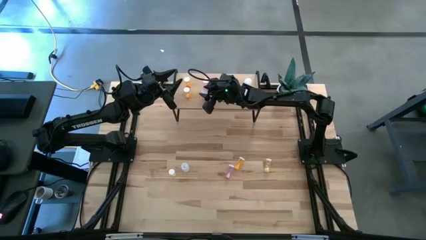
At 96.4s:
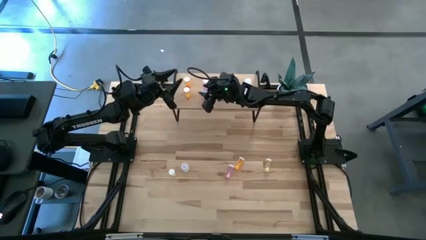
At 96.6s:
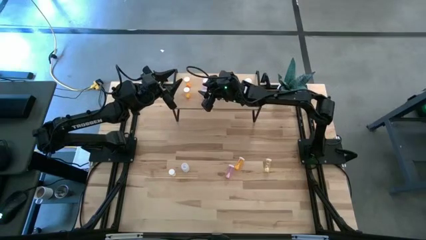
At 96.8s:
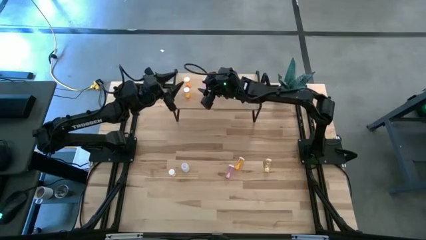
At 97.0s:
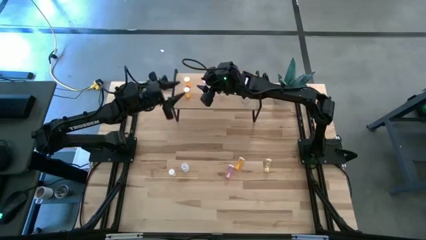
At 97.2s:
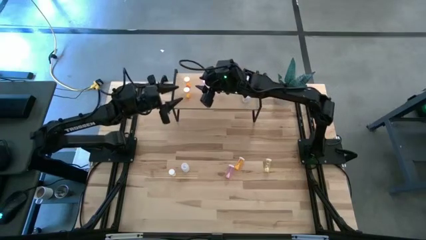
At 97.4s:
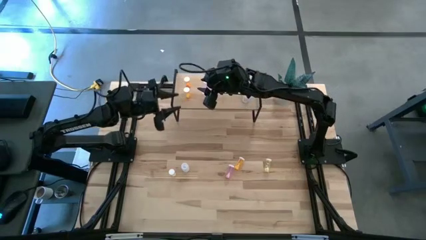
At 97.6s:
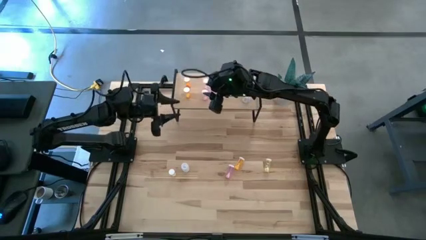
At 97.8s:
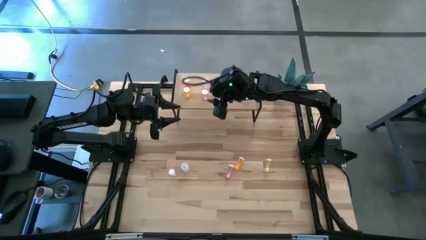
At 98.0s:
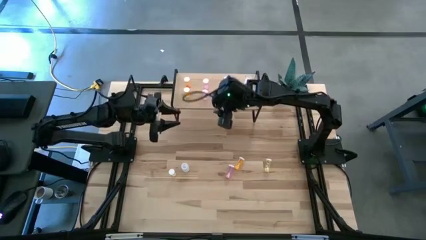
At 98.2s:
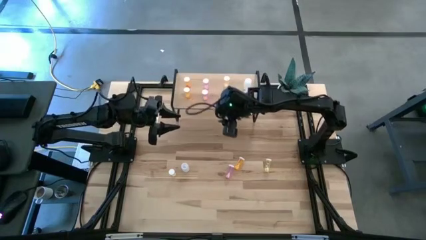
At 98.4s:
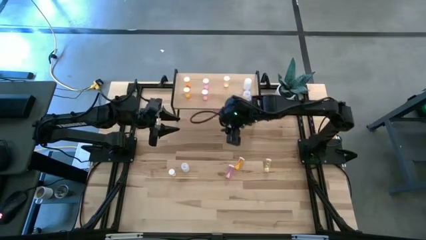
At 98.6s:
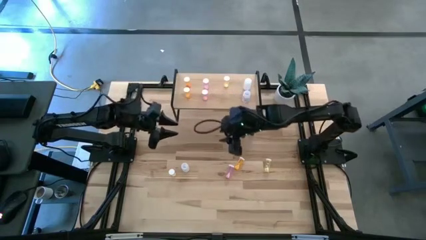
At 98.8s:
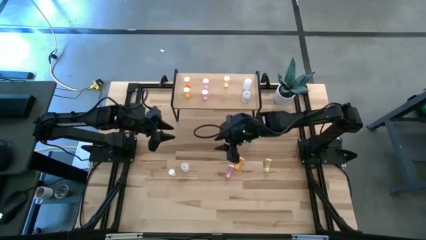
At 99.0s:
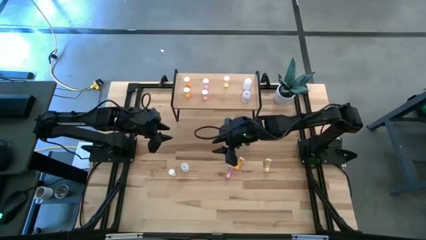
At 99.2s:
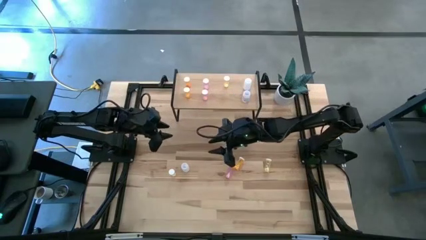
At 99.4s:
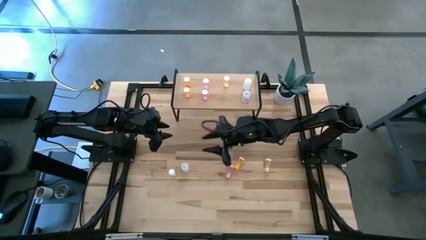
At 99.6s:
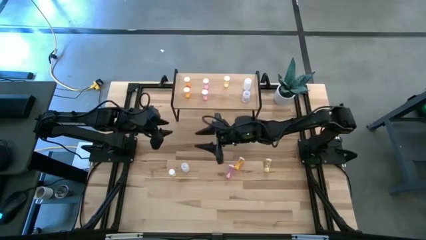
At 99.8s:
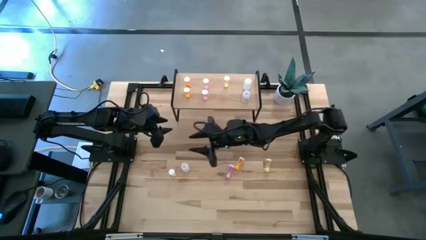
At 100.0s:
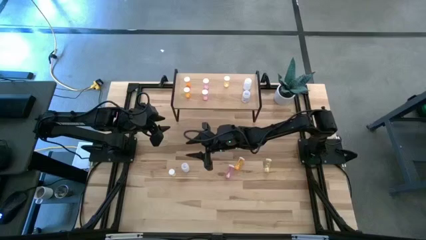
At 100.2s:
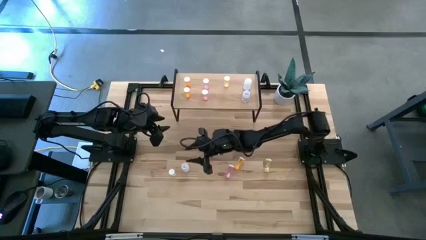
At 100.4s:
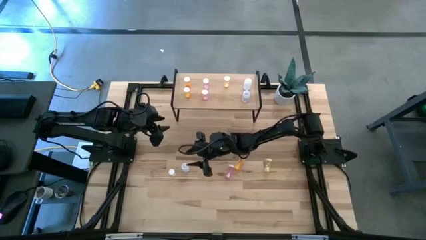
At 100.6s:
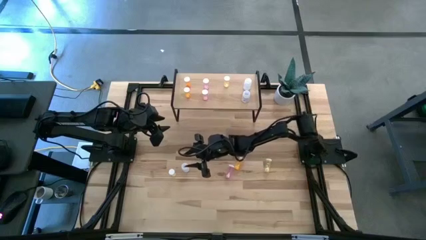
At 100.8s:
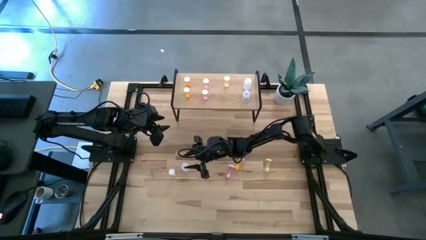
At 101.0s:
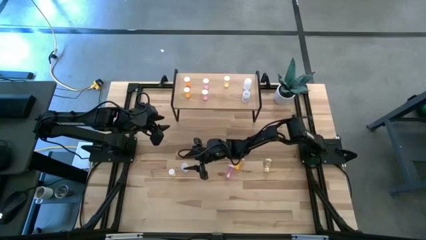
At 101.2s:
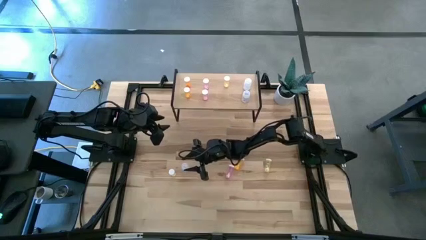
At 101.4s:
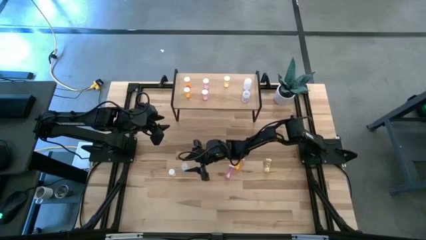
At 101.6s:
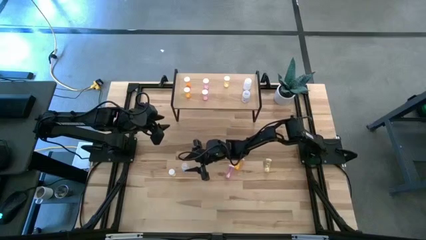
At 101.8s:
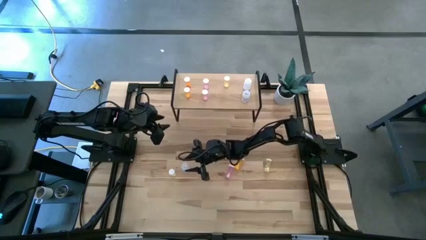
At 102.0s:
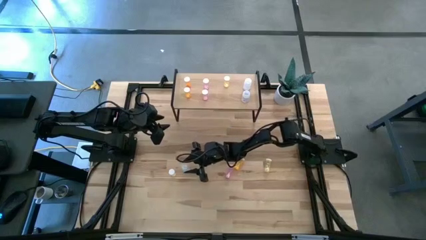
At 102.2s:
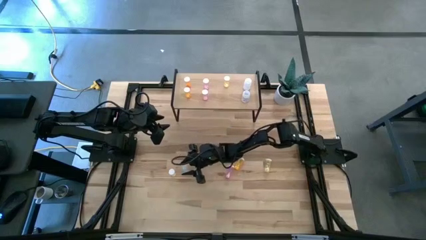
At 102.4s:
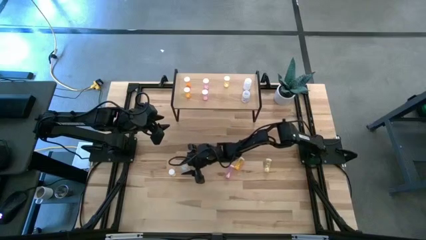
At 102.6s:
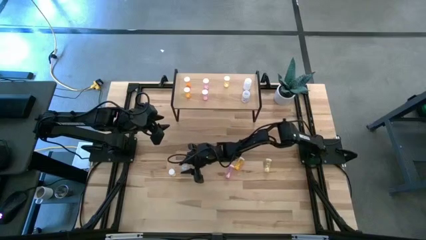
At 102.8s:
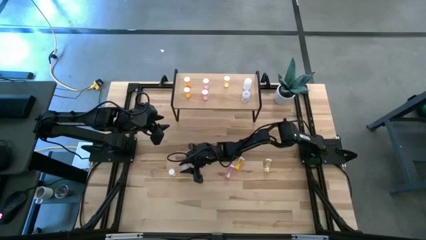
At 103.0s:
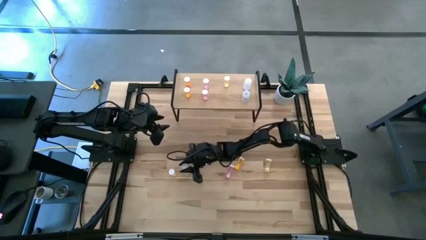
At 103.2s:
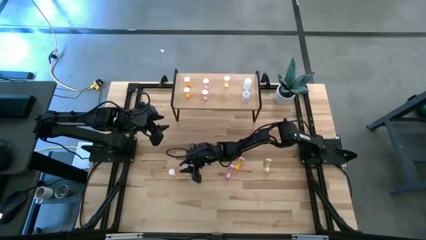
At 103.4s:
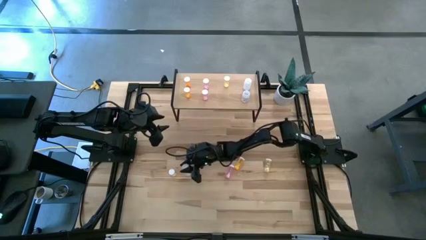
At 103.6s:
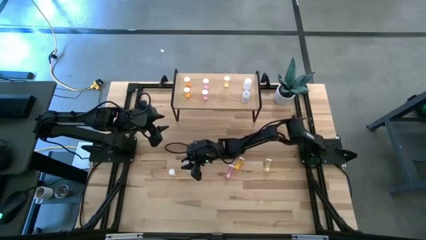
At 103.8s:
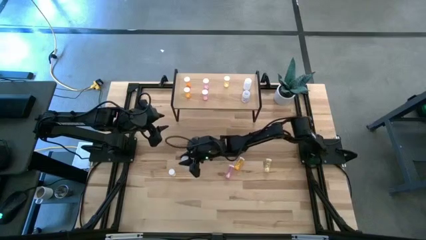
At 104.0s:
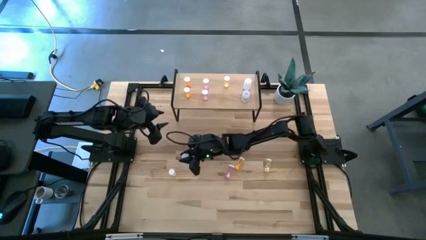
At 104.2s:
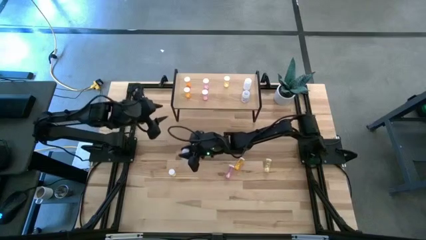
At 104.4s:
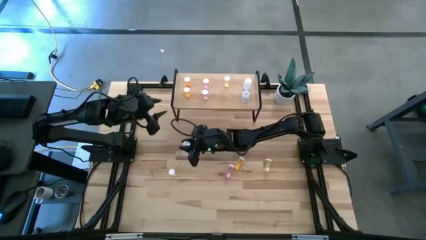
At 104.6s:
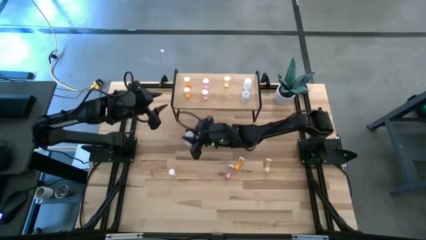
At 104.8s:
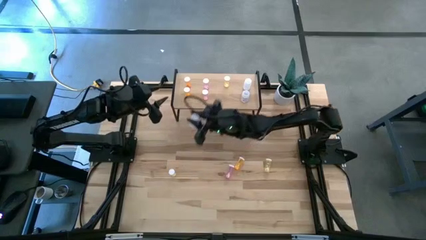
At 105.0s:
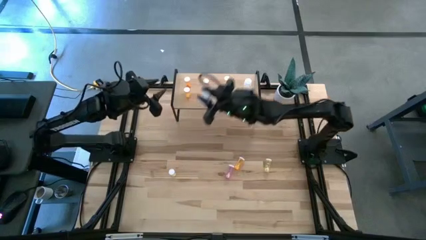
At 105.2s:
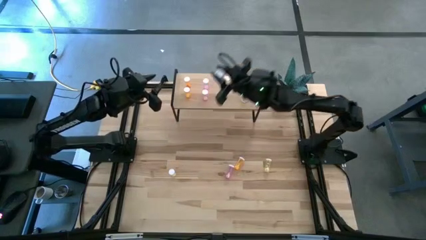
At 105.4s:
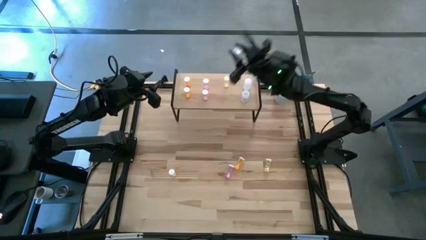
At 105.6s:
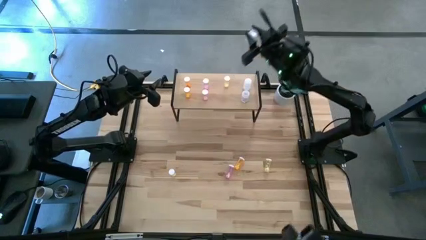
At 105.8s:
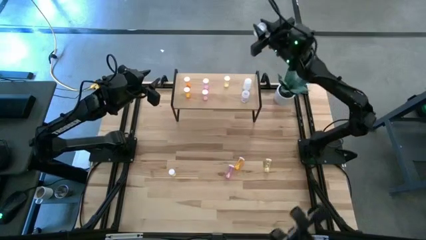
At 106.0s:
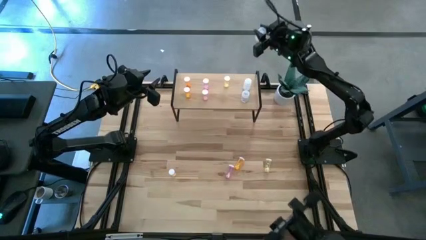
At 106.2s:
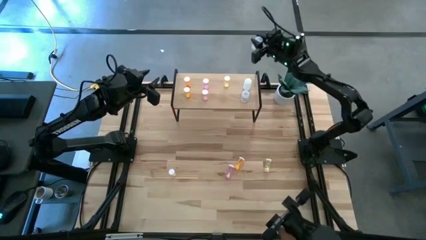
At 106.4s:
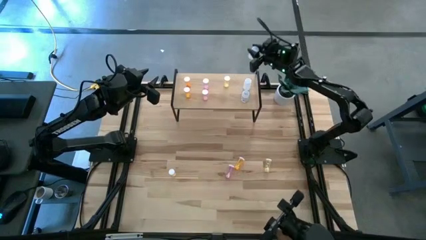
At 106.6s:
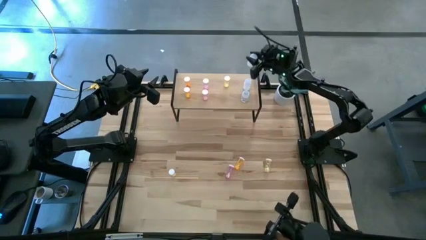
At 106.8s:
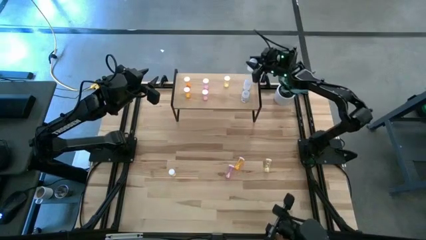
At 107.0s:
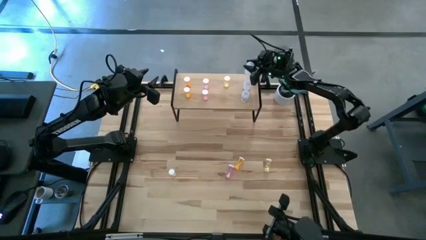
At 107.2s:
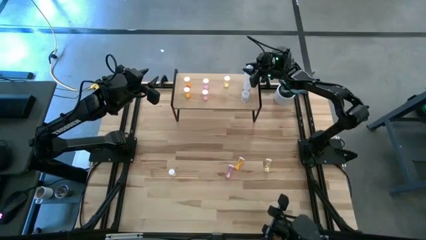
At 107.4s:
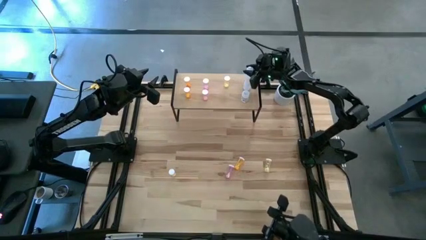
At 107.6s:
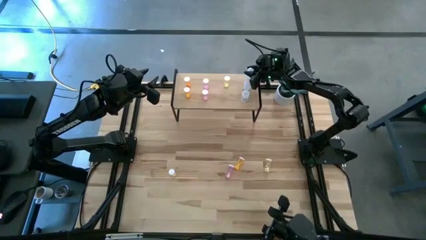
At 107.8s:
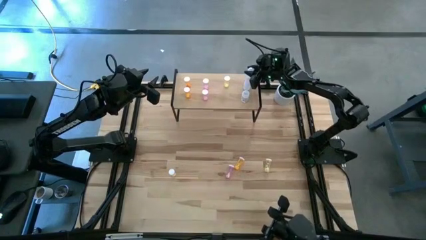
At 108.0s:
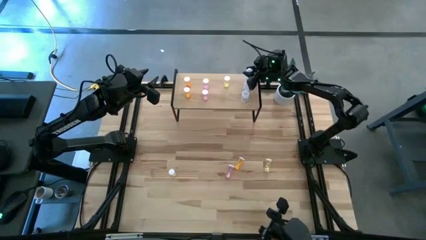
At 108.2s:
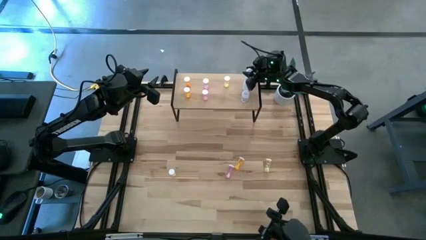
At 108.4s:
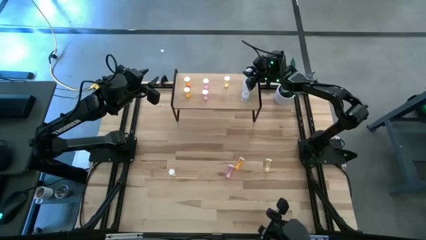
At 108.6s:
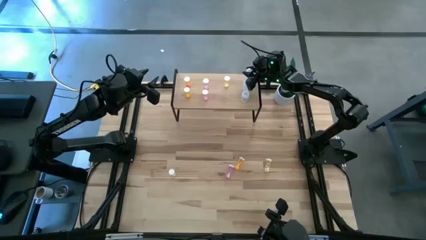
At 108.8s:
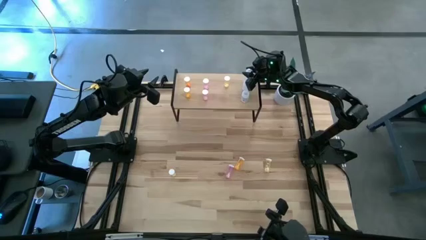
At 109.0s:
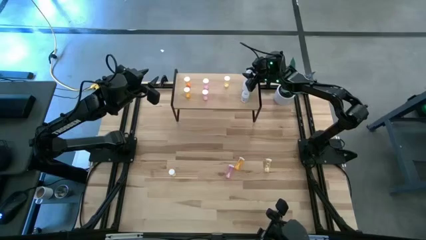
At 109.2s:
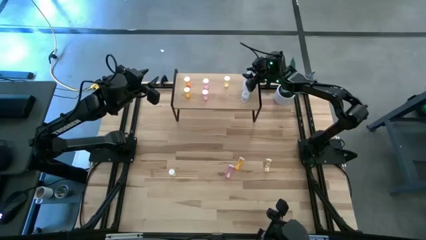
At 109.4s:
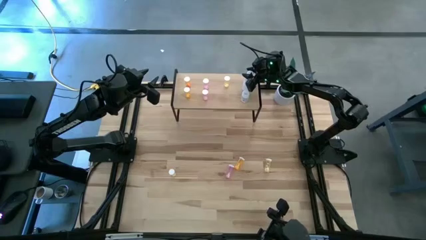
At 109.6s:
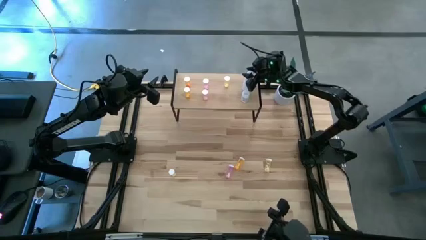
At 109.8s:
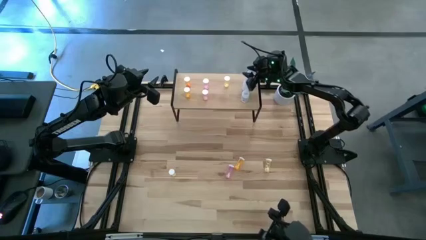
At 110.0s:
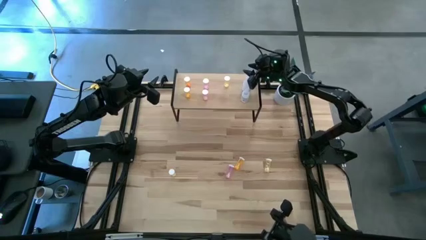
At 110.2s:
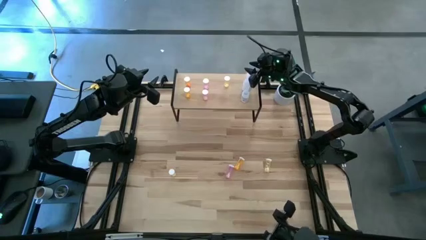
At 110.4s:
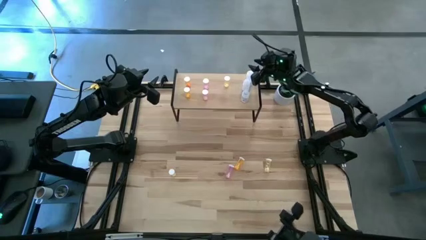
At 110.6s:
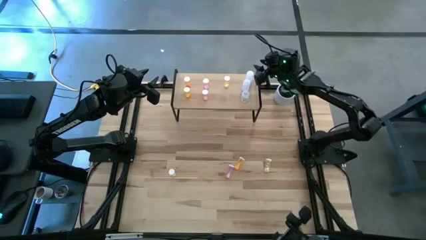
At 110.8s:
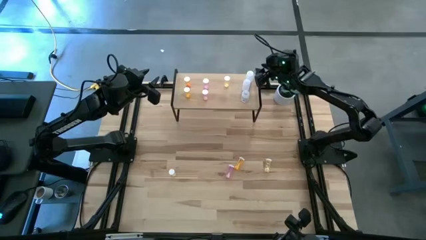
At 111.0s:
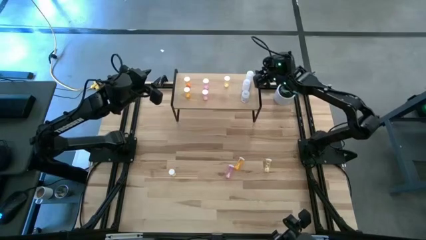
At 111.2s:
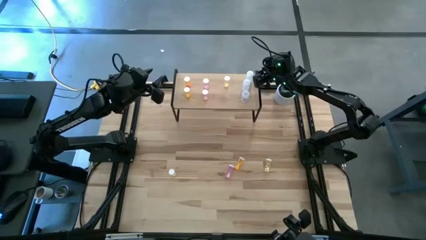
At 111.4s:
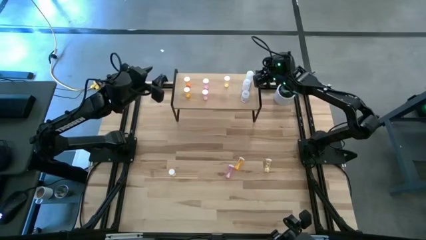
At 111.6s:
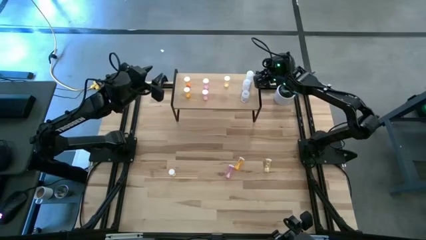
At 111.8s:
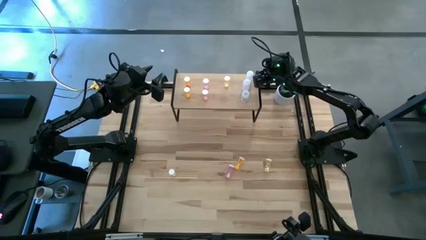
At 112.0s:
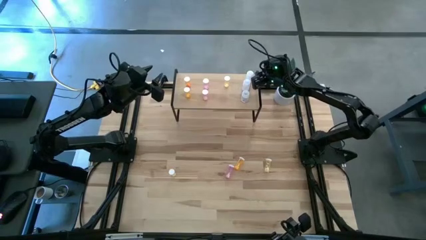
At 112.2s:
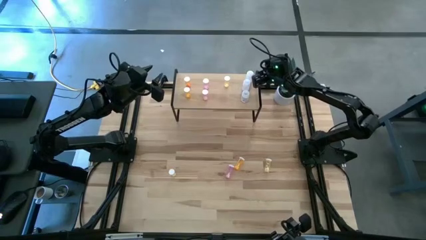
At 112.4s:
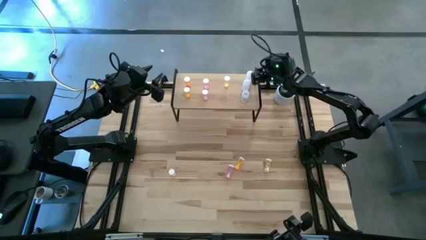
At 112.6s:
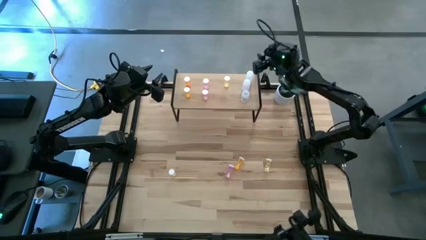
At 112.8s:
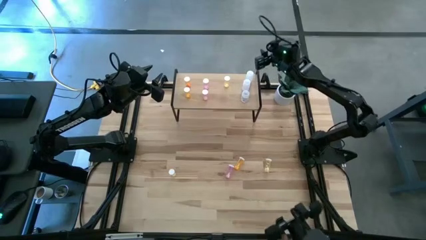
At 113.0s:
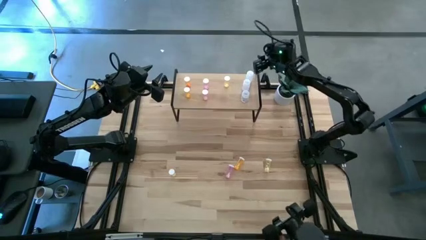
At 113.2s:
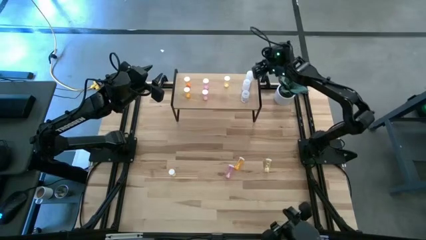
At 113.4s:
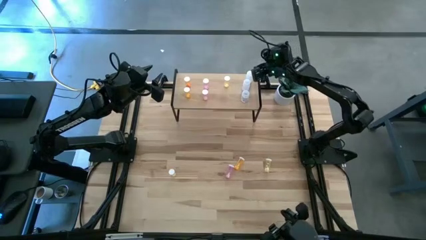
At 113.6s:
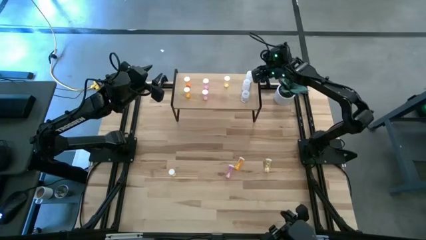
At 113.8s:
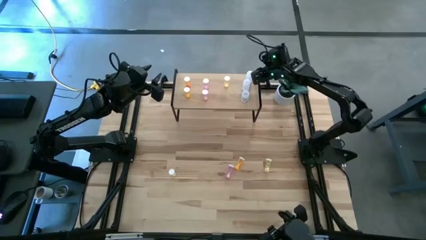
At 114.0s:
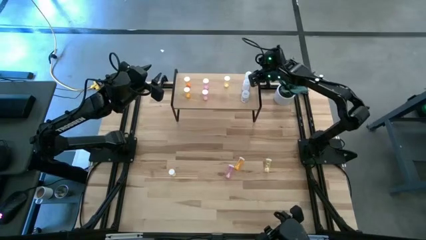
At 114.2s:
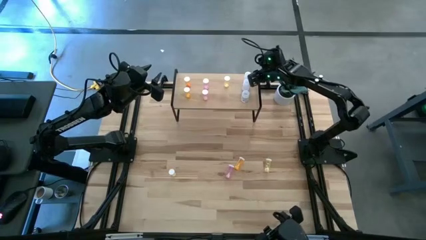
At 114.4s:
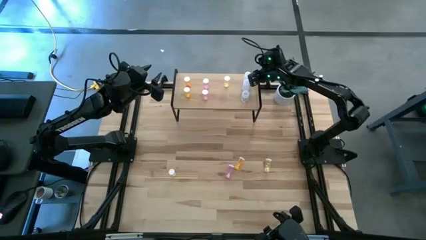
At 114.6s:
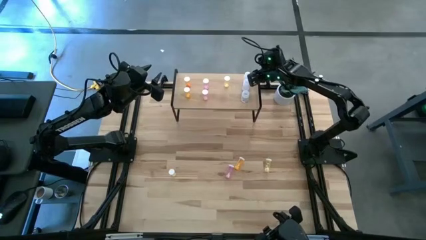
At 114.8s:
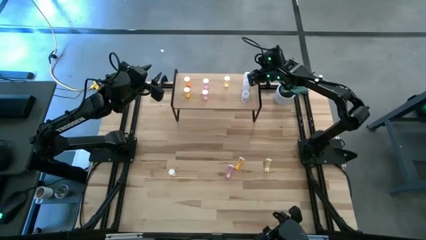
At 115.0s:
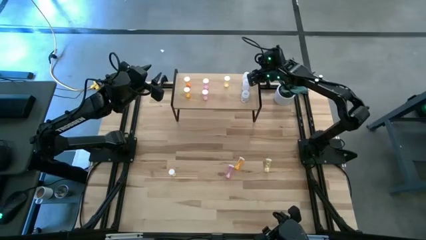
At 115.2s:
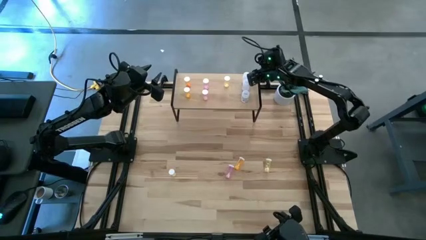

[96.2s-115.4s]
Task: Pick and place medicine bottles onto shelf by color
Put the white pill bottle on the shelf aligned with the other white pill bottles
